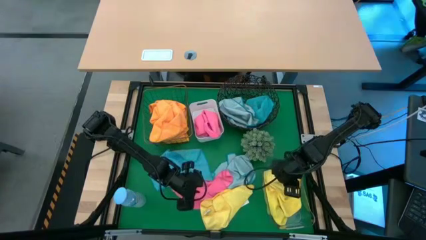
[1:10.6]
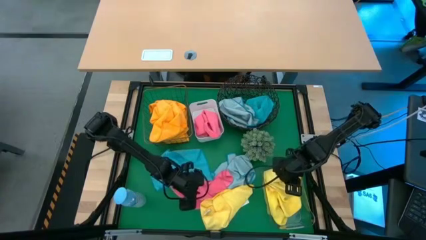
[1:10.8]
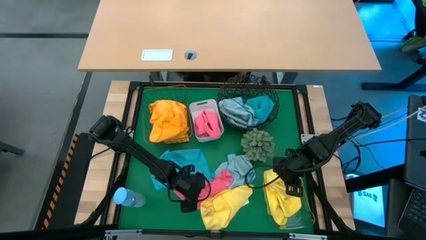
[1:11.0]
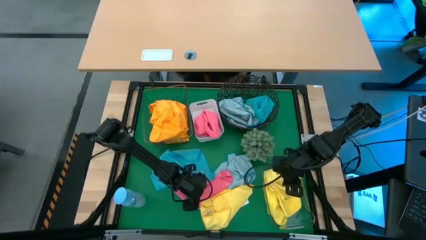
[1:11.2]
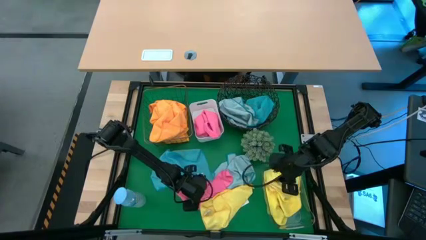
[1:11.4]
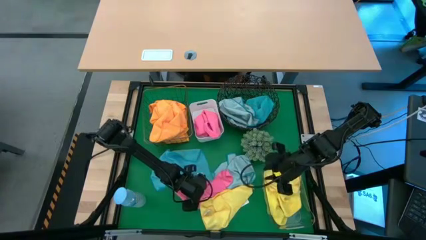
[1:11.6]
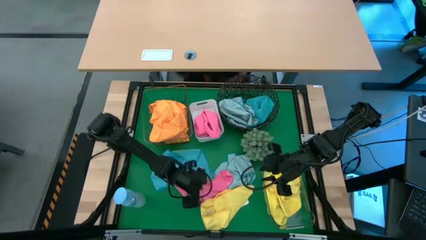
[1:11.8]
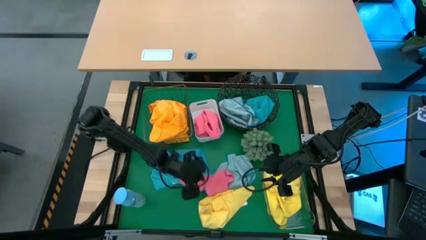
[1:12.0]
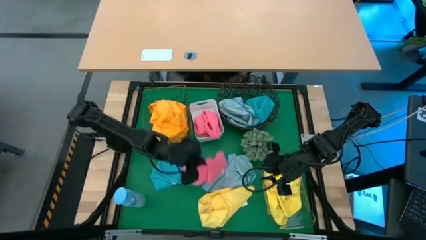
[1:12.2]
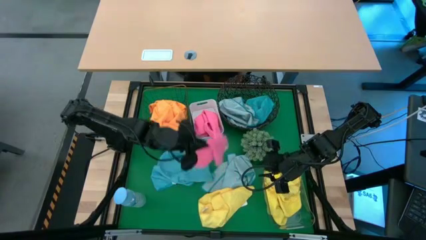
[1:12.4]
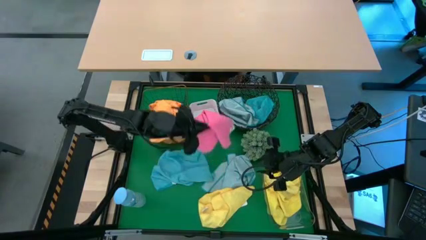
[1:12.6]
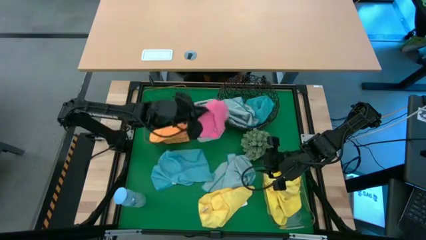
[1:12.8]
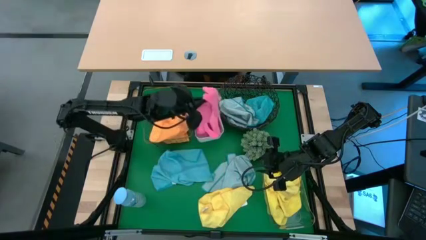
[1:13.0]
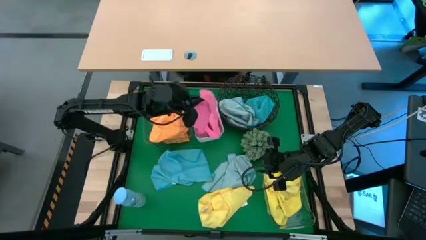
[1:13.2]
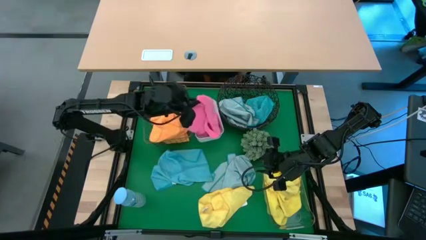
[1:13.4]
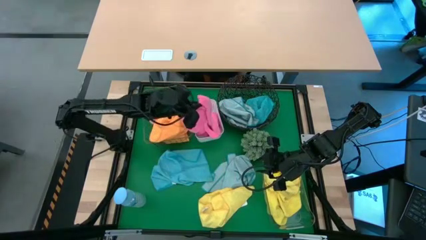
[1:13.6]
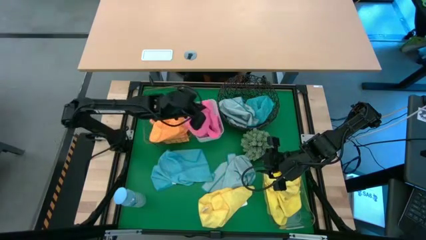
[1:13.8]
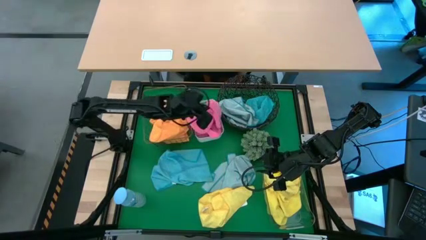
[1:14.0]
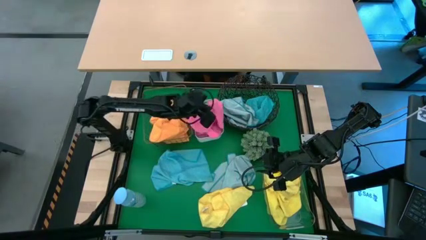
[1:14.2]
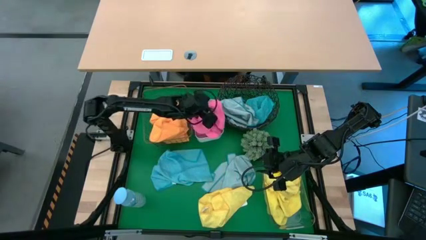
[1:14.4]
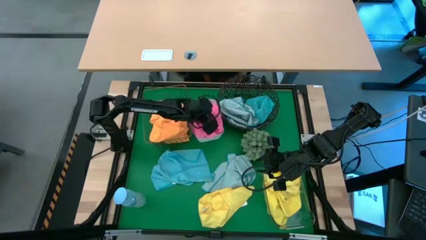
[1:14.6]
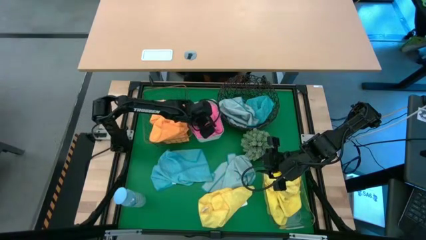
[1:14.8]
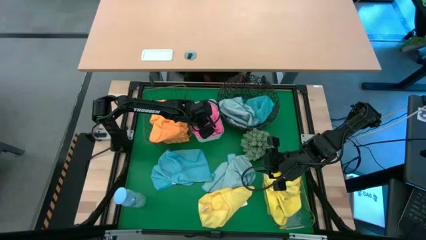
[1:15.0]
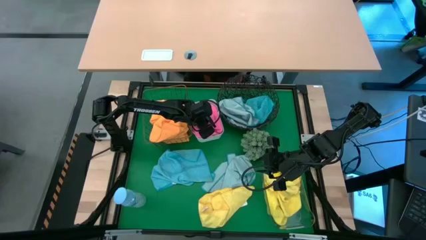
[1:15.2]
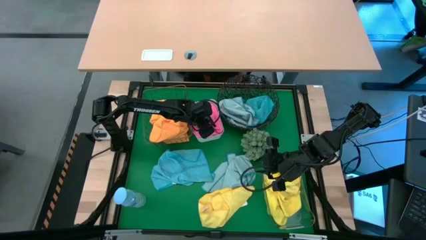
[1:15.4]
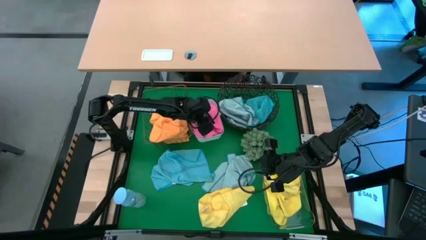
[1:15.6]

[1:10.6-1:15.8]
Task: Sort microfiber towel by color & place in baskets
Put the pink microfiber towel into the white bin

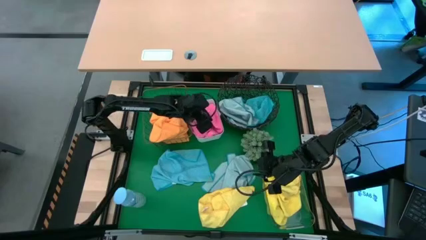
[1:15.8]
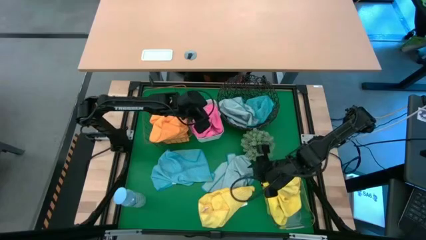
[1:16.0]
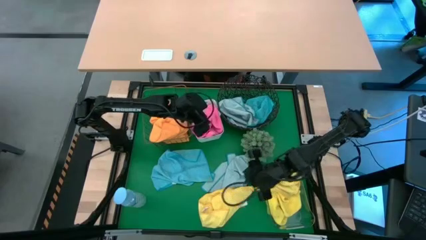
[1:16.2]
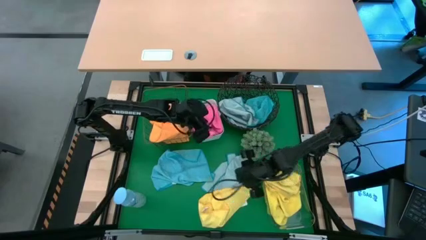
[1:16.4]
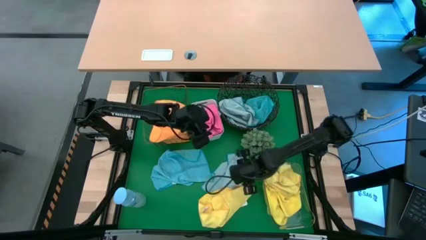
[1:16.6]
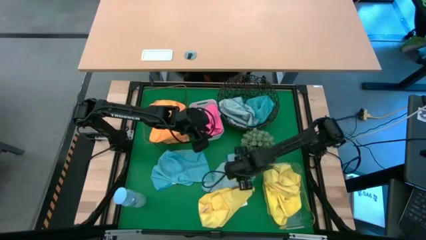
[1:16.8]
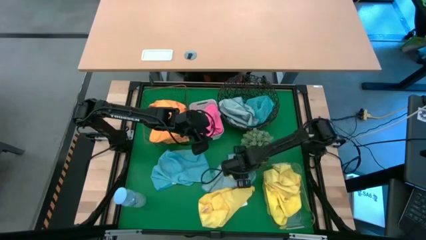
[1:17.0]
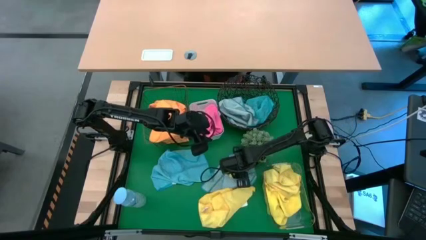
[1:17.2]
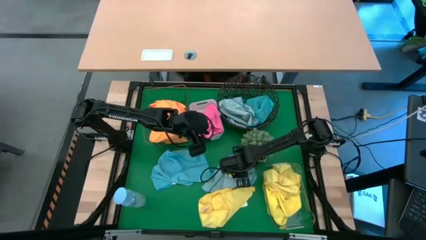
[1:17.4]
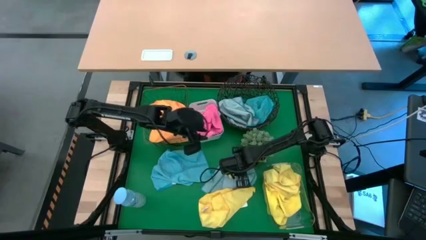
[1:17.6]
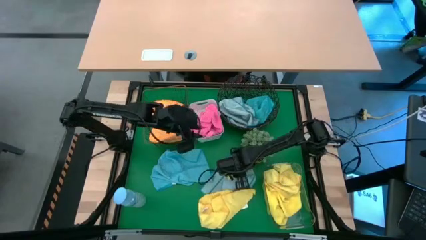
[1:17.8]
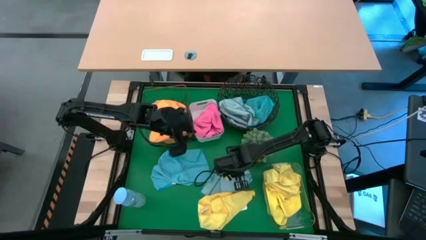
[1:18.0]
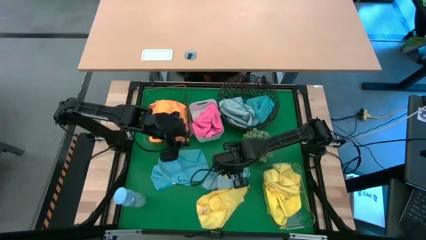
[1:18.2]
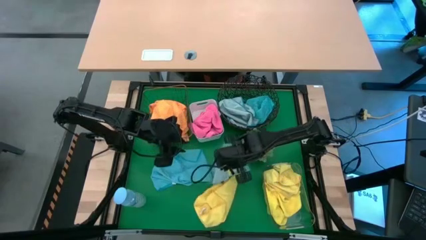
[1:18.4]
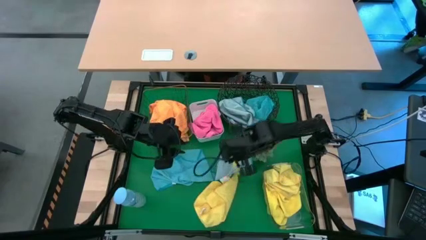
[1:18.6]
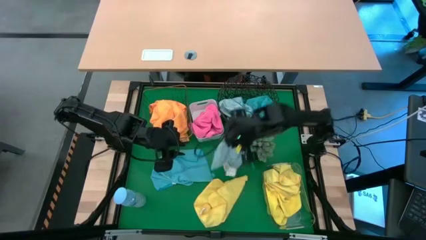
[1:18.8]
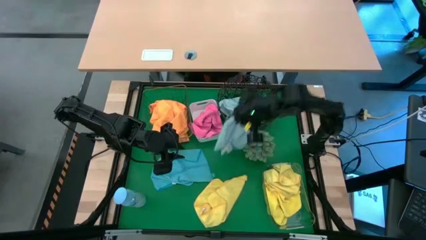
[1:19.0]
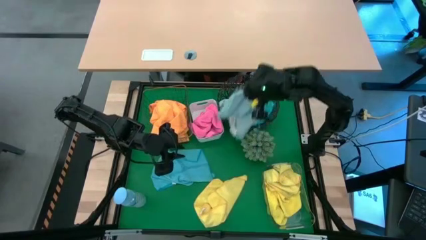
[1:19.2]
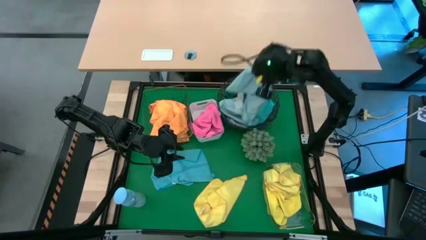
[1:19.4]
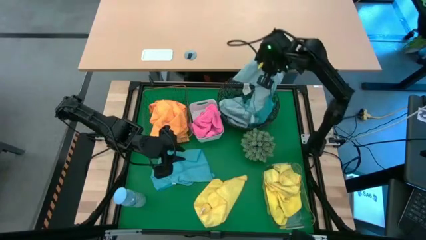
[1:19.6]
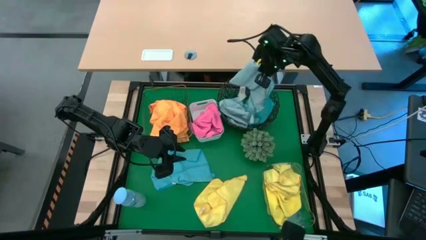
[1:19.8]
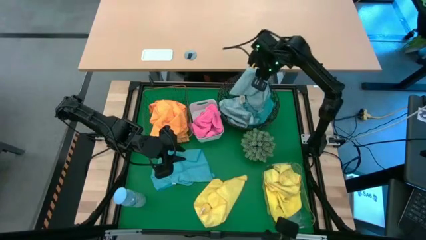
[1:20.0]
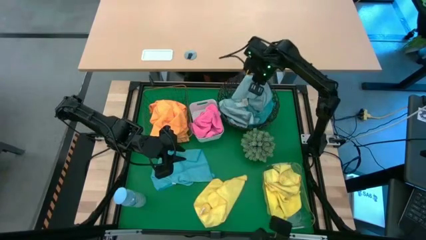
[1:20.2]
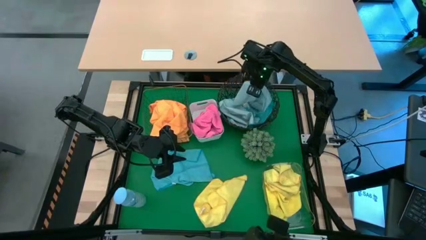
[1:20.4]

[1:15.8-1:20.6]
Put the light blue microfiber towel into the black basket

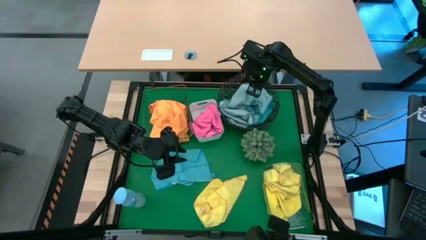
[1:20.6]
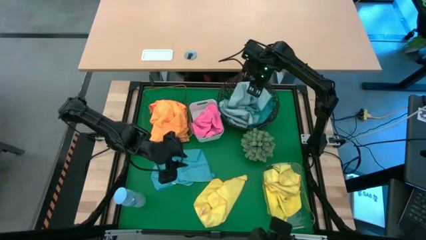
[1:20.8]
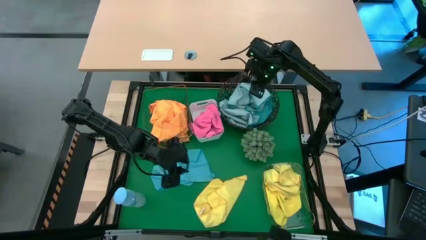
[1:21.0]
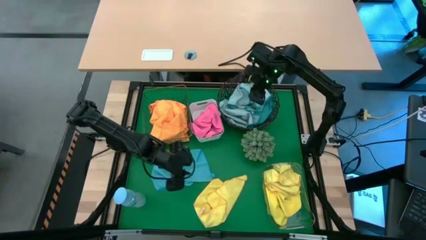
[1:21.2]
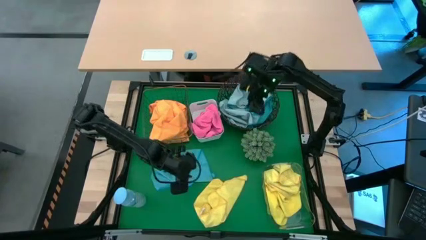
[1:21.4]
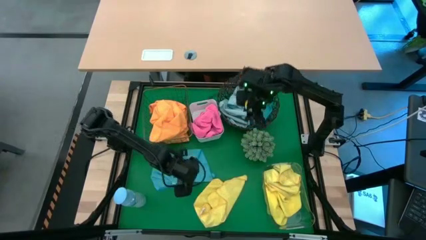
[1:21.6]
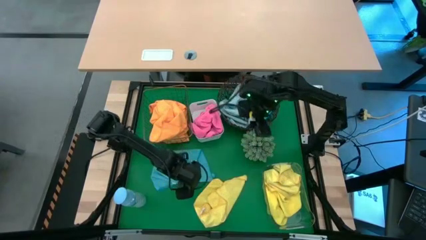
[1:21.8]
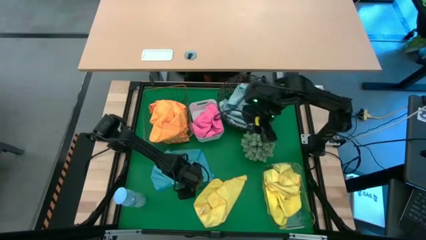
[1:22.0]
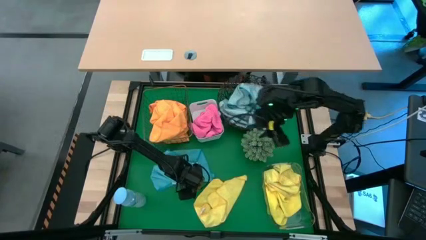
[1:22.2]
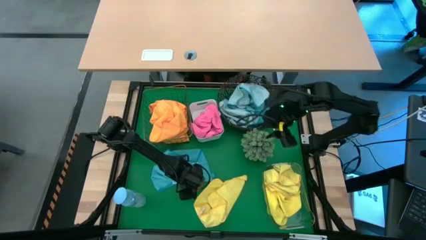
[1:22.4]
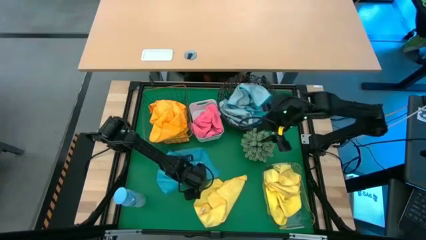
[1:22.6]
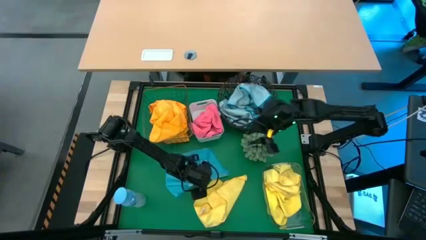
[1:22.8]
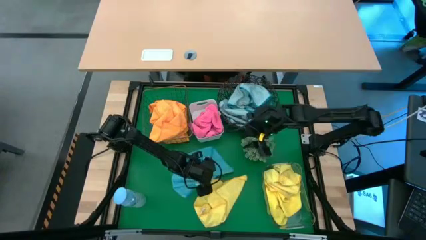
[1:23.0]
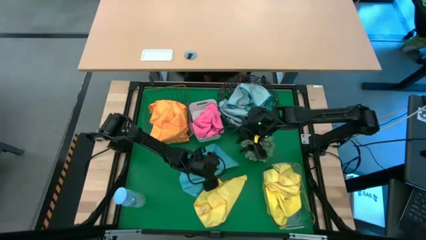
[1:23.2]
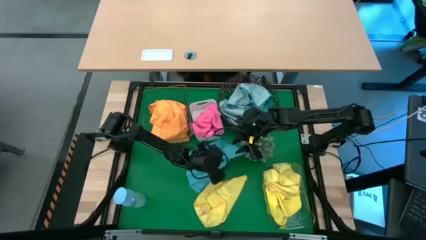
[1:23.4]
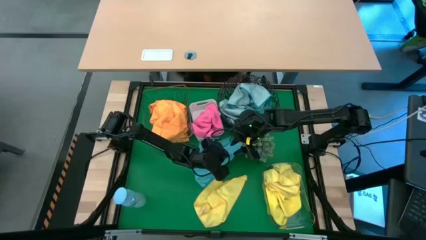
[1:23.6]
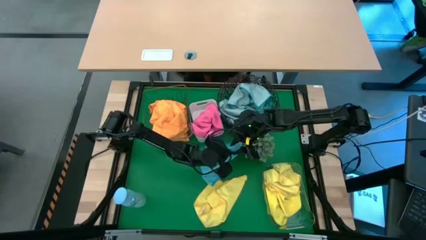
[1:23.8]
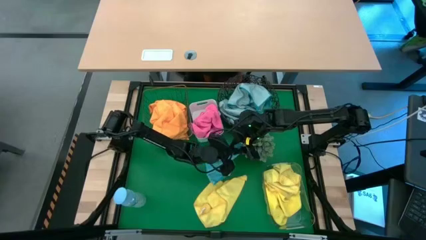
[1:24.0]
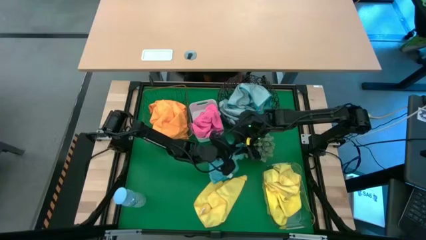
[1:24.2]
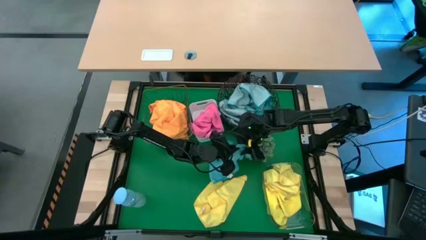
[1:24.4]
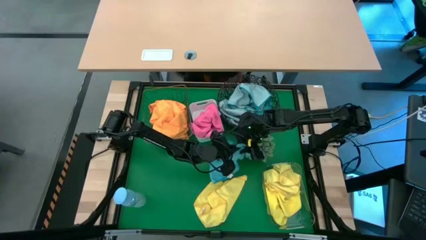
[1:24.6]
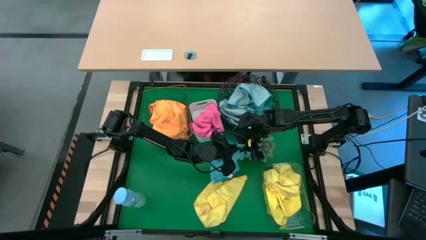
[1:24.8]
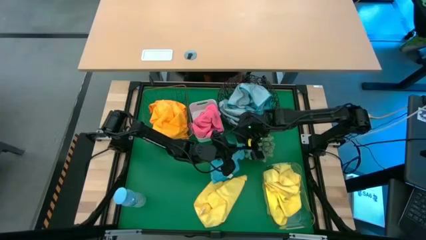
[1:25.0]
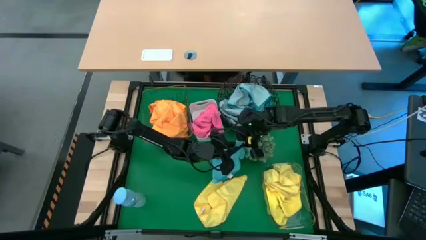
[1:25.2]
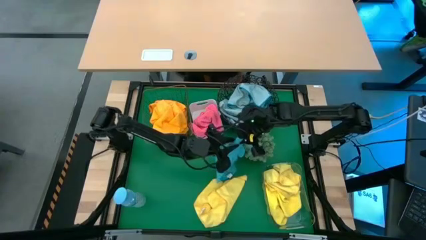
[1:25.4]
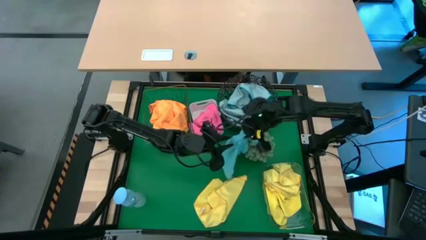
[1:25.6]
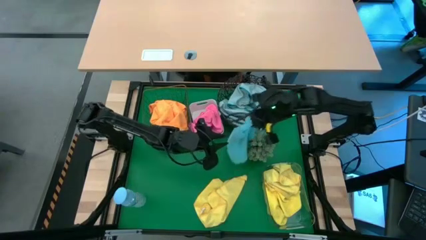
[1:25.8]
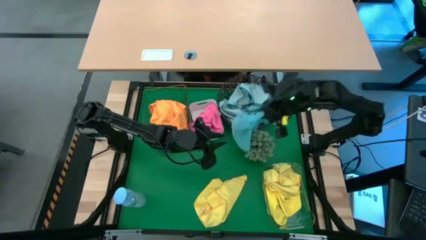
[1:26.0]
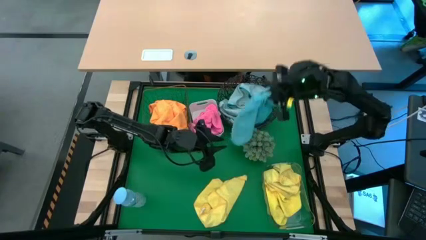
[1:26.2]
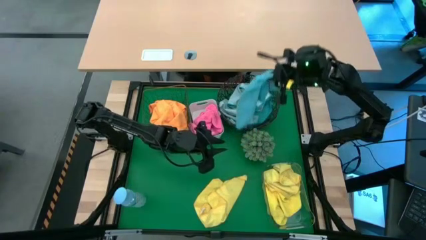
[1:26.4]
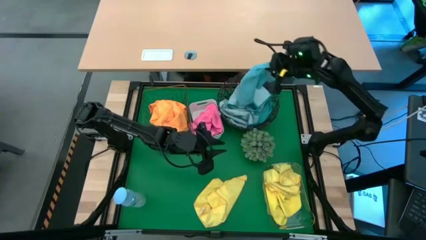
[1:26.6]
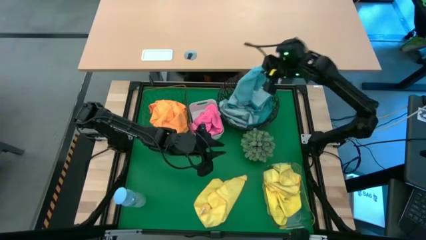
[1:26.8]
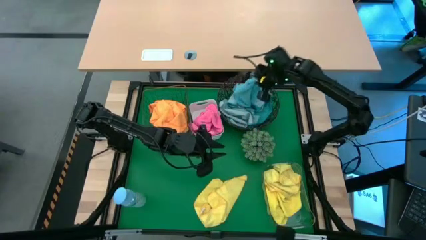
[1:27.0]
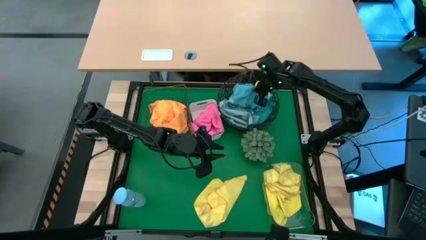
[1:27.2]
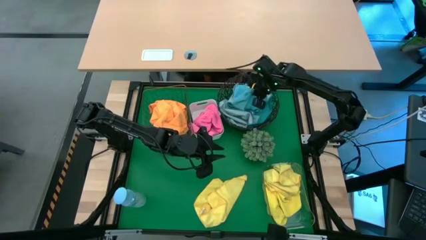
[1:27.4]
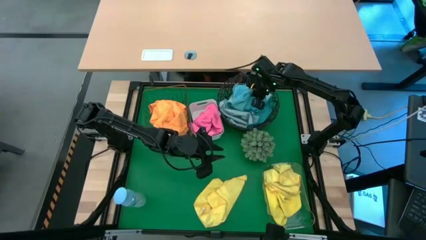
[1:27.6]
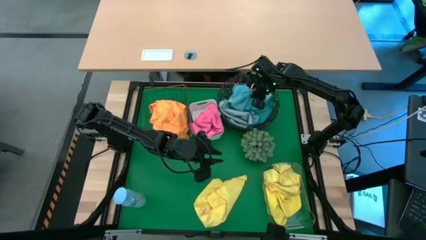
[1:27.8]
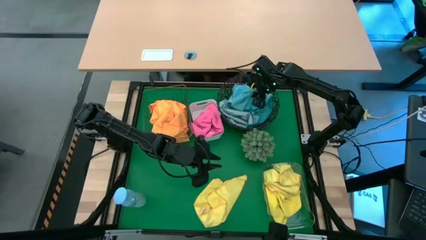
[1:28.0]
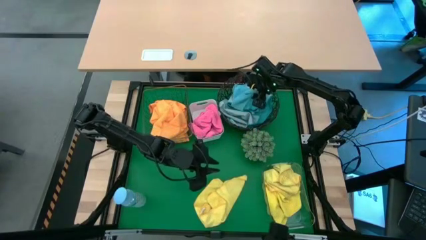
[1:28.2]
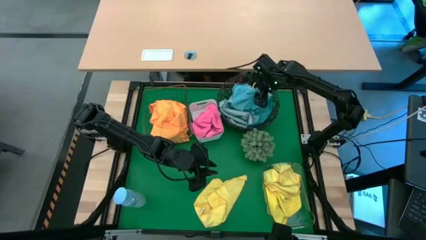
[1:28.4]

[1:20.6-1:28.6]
Put the blue microfiber towel into the black basket
